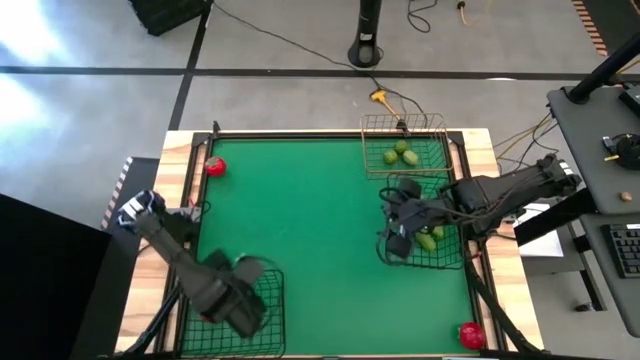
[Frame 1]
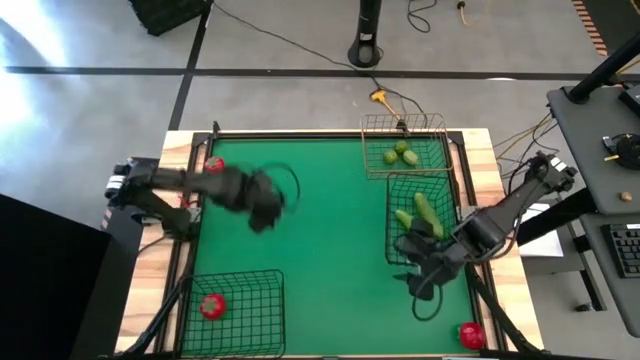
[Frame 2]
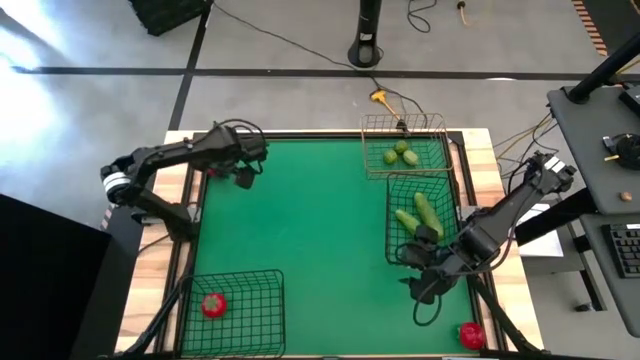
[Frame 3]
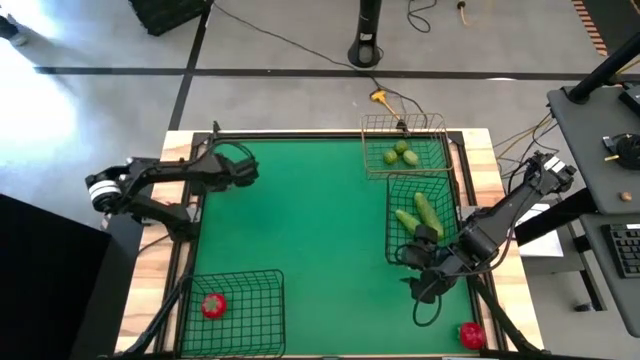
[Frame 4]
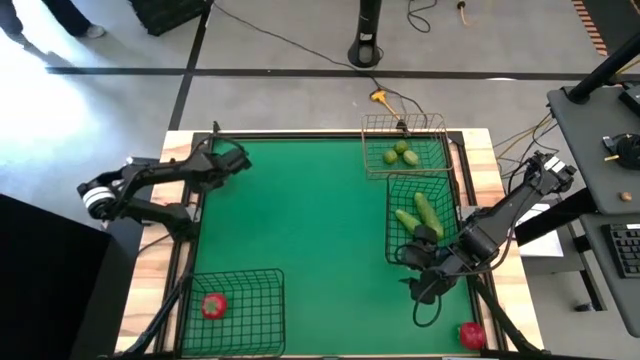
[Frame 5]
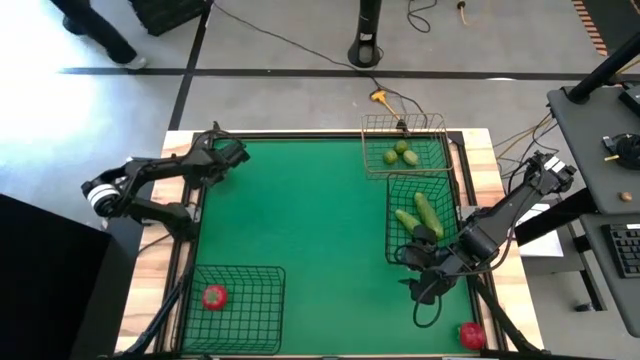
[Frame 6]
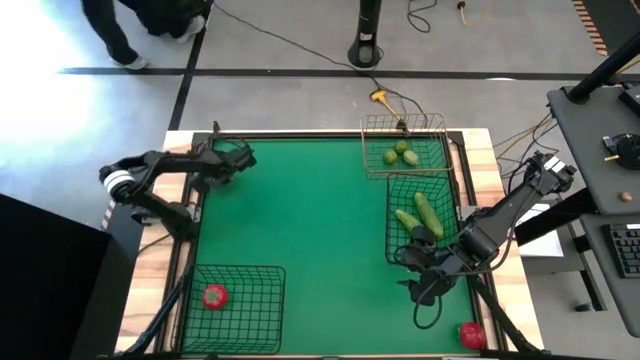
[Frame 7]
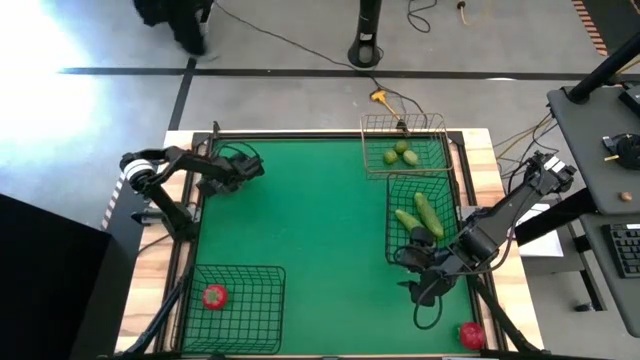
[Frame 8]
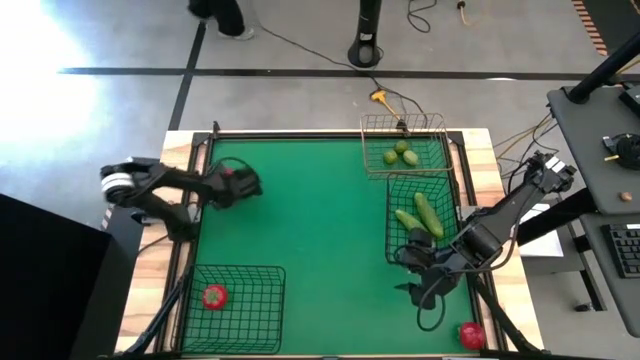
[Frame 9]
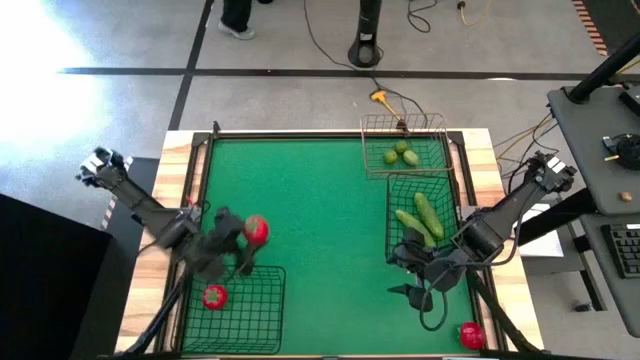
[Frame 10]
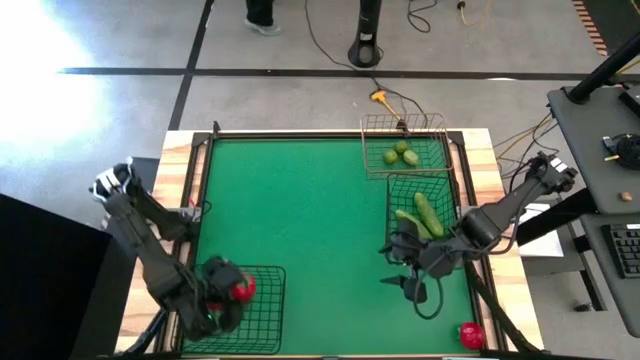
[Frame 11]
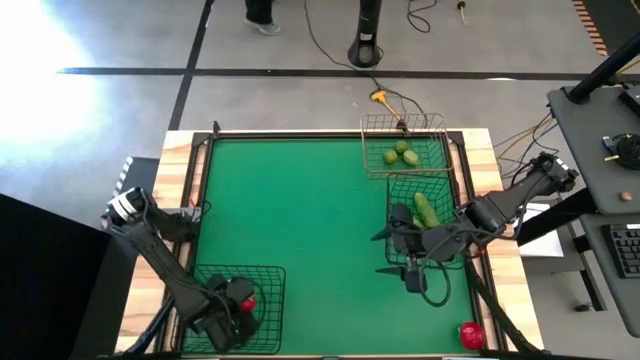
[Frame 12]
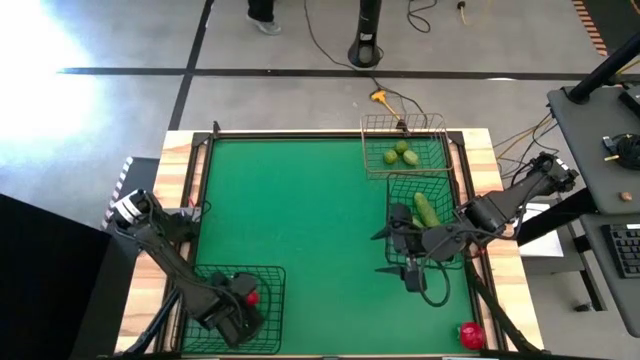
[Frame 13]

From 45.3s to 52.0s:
Task: Sort produce into baskets
Put the top tomato into the bottom black wire basket

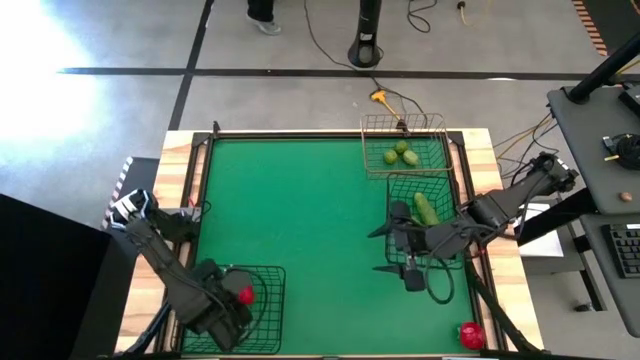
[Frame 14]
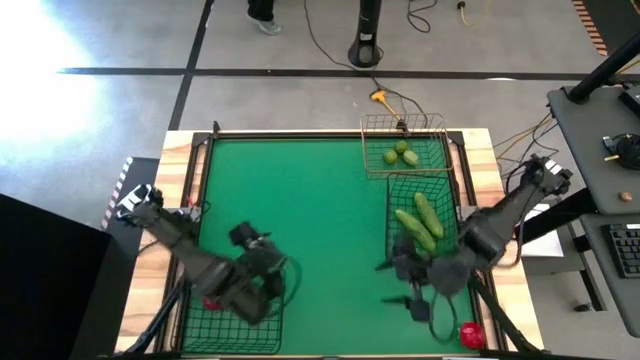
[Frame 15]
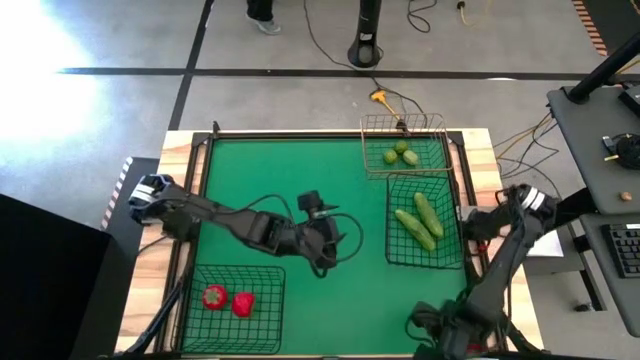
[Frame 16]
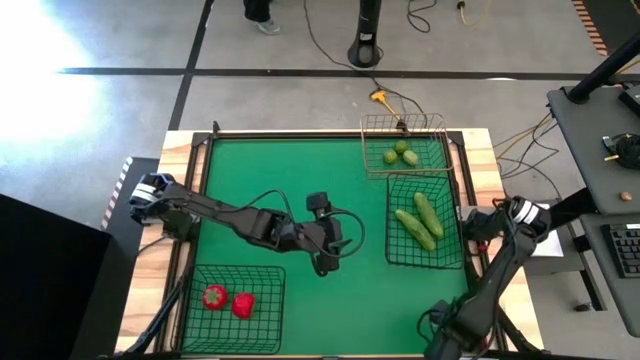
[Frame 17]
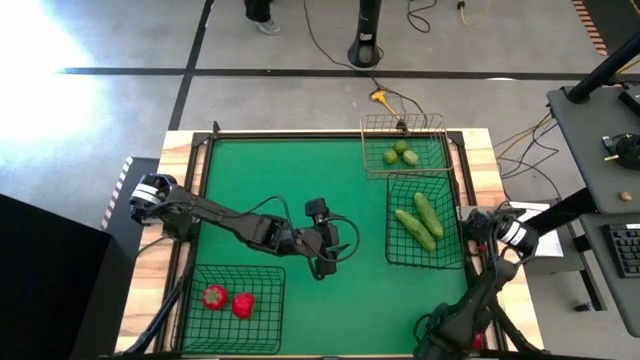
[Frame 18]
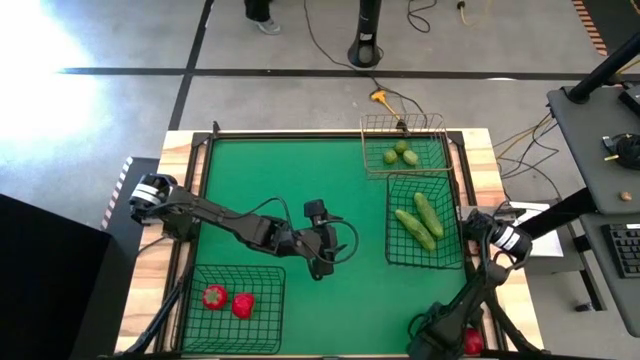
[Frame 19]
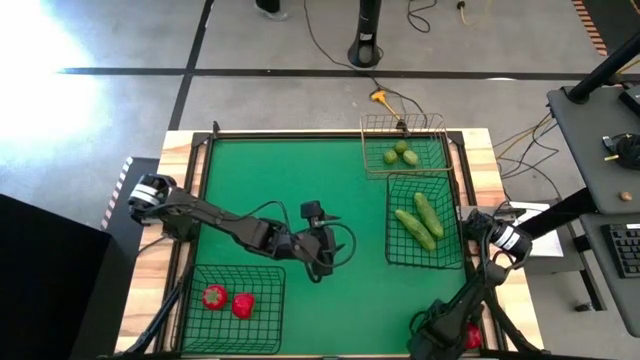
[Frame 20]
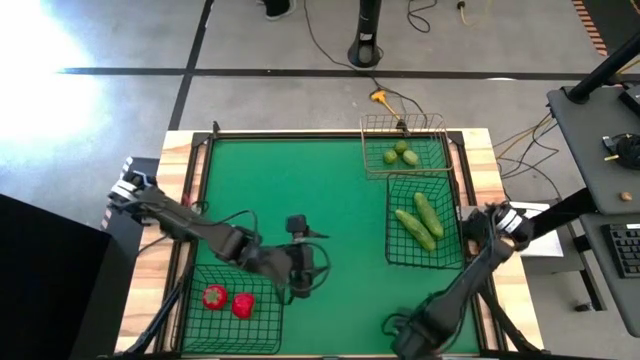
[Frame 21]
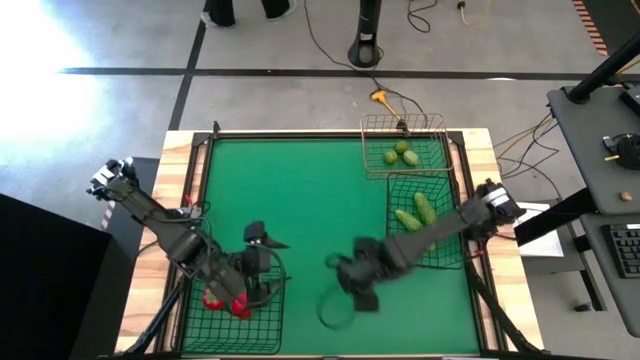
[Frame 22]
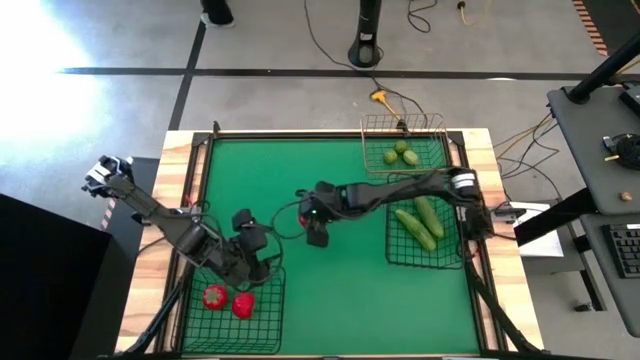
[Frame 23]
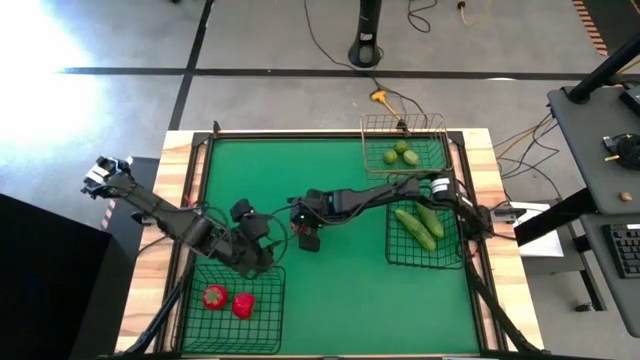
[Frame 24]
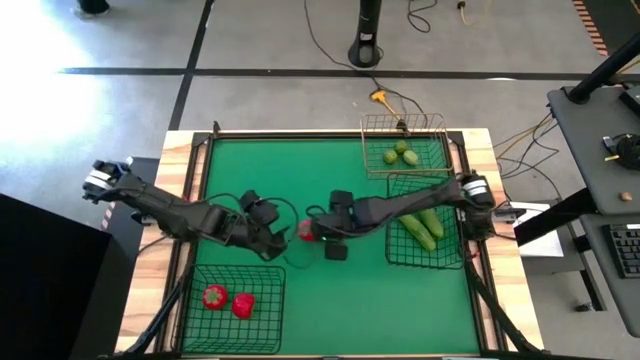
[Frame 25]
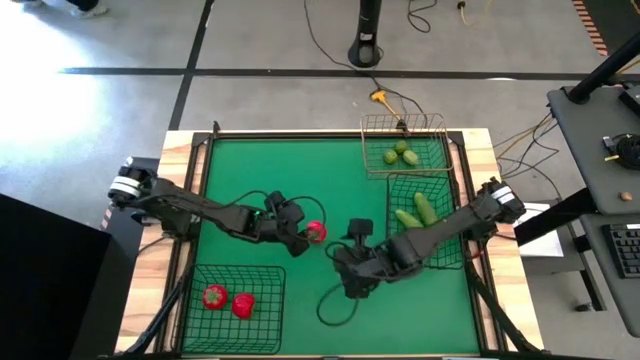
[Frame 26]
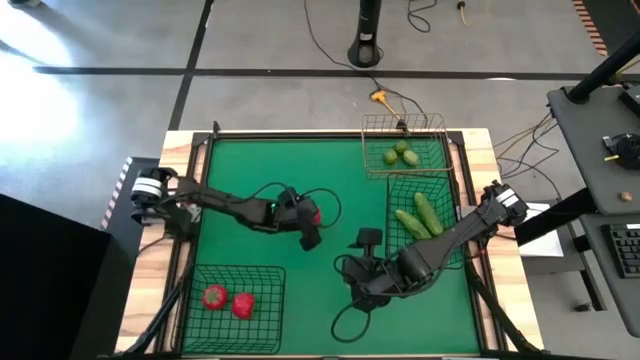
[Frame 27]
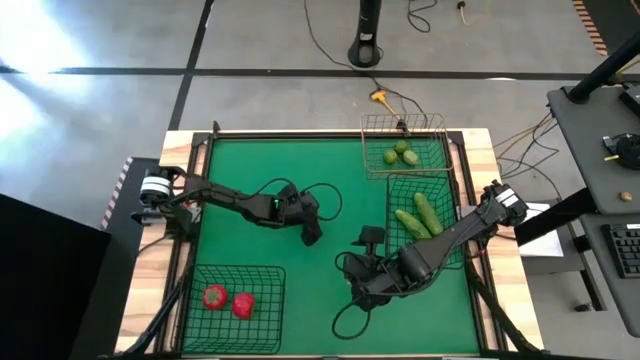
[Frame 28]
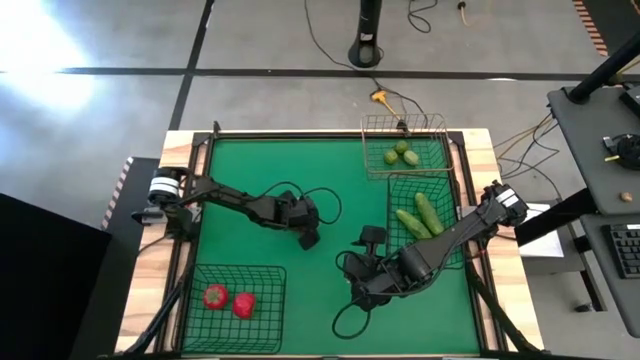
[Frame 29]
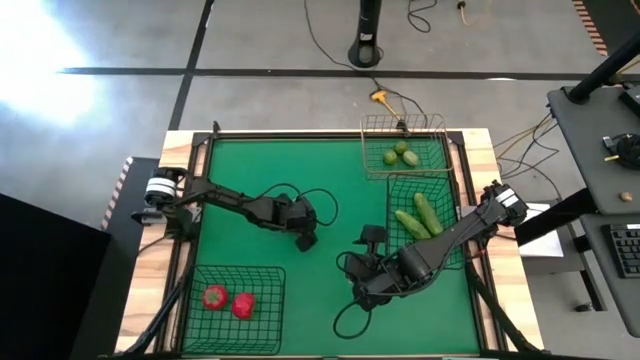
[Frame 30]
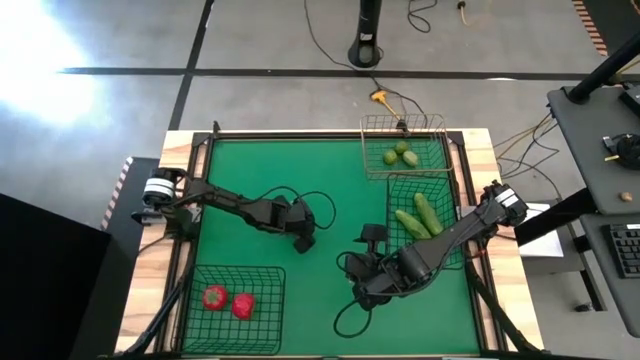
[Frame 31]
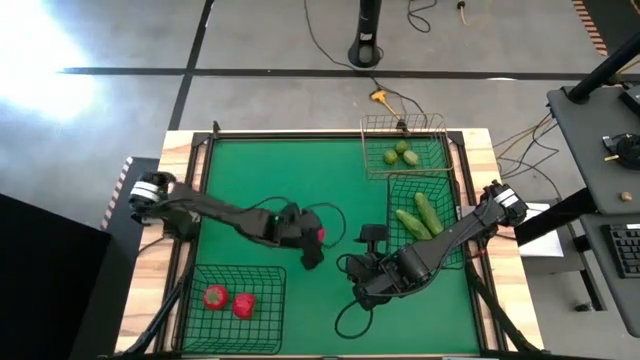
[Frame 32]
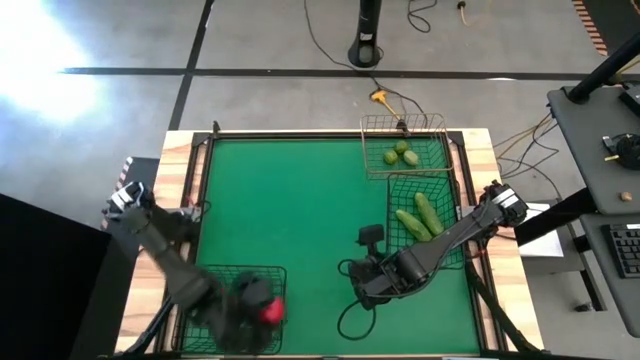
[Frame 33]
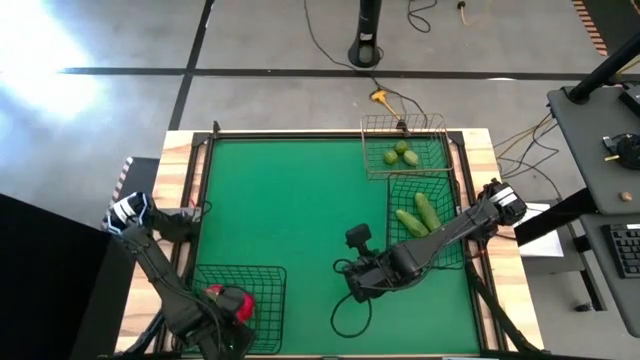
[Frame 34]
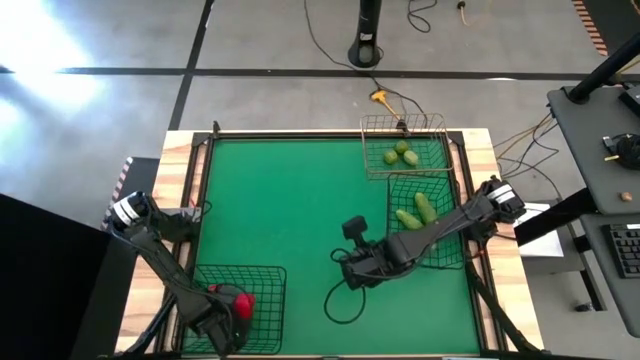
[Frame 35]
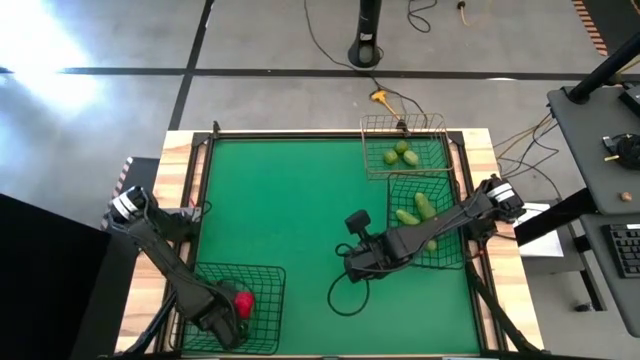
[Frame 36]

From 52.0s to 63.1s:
Put the tomato into the bottom black wire basket

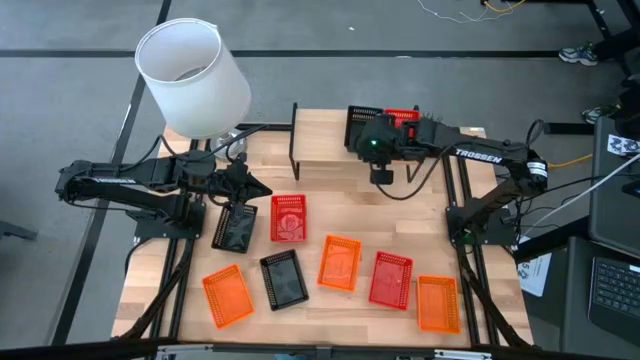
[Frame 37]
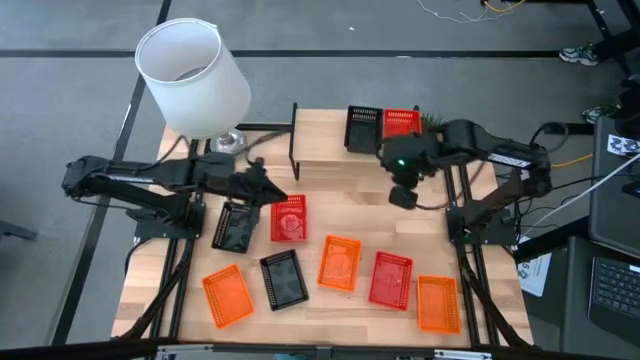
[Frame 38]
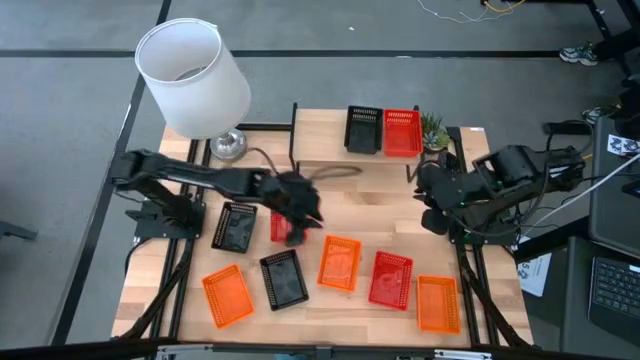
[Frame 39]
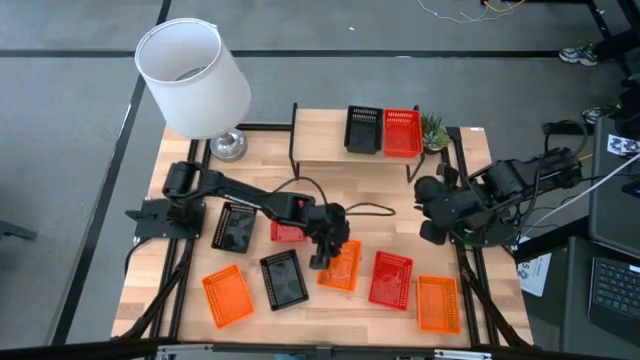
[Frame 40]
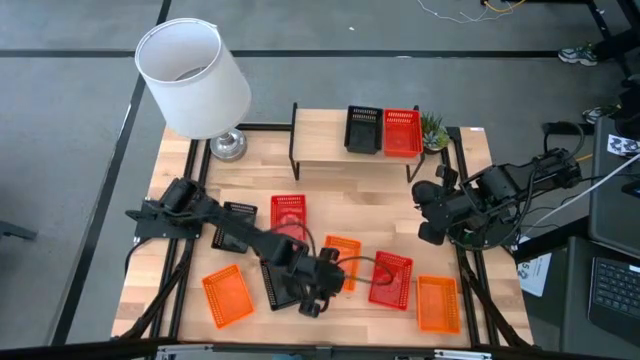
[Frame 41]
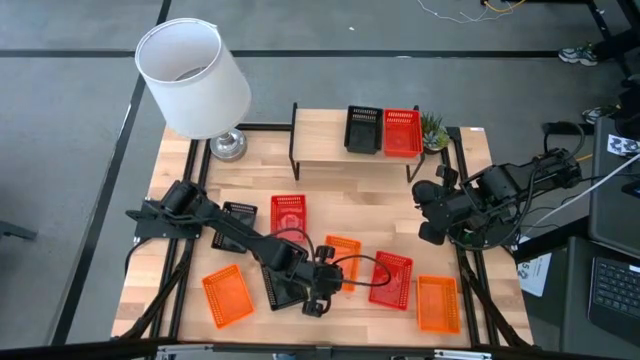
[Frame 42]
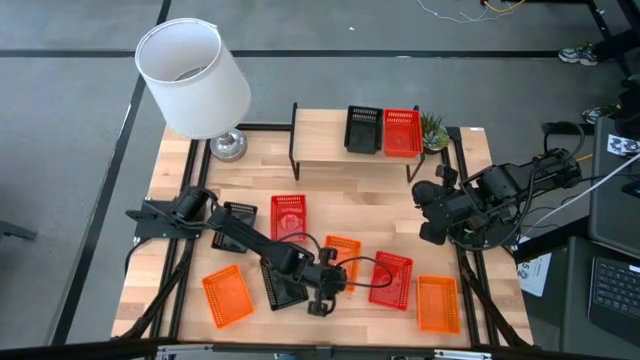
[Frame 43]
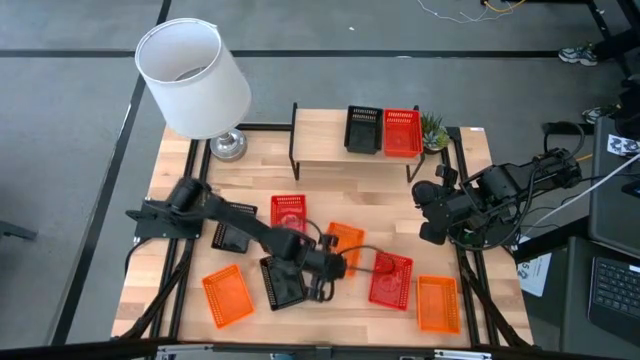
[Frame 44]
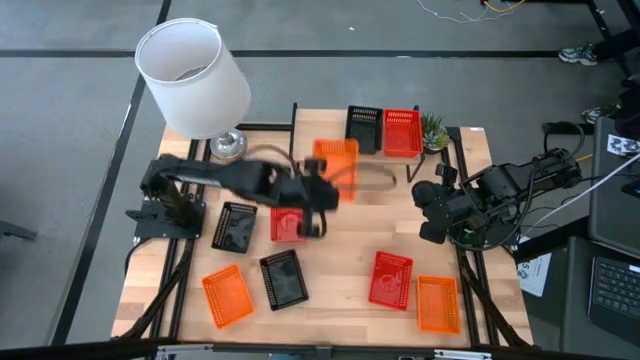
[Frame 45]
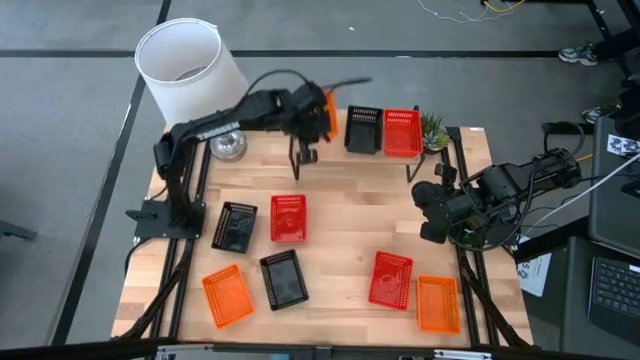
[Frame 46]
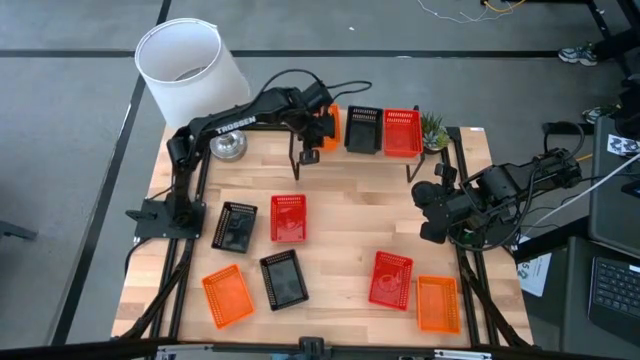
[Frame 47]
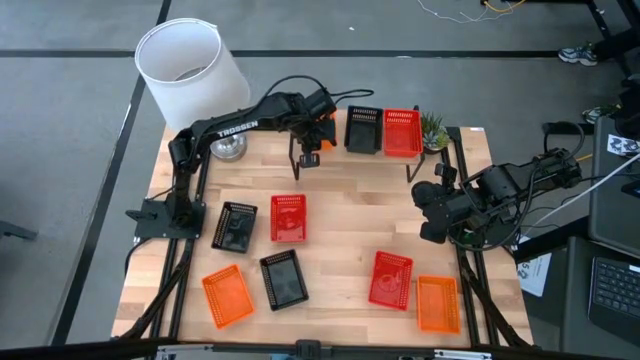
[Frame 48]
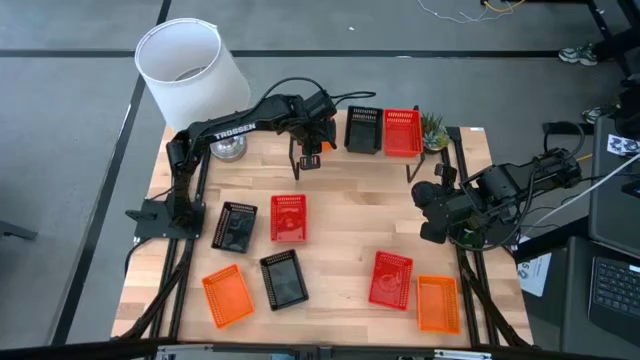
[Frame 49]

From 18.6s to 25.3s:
Task: Stack baskets on shelf by color
Put the middle orange basket on the shelf
